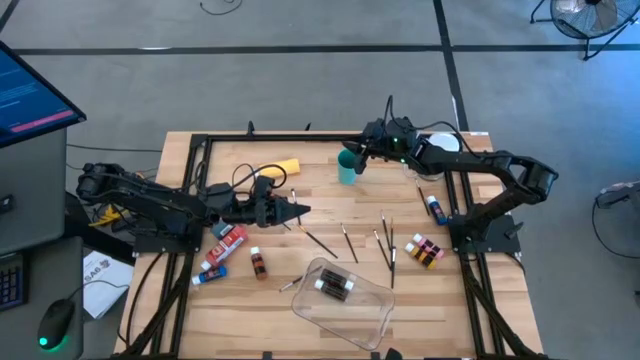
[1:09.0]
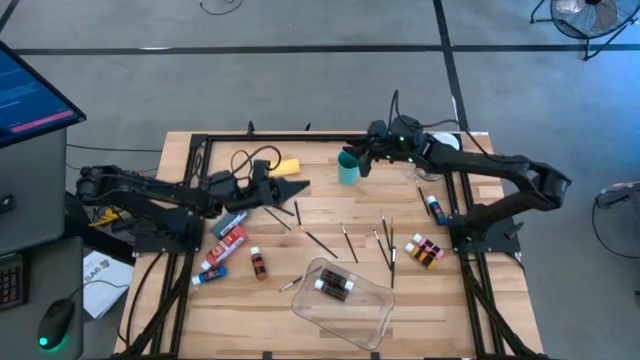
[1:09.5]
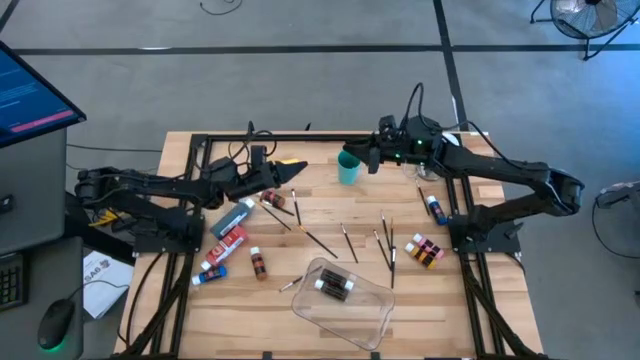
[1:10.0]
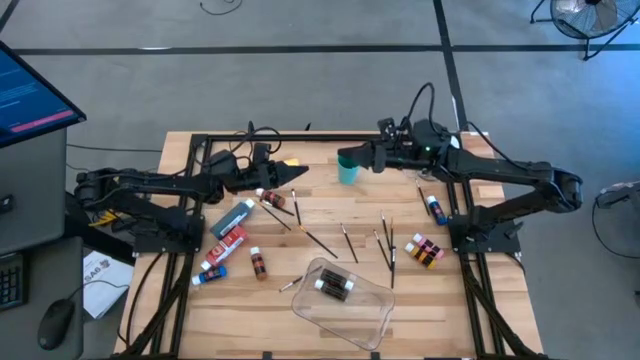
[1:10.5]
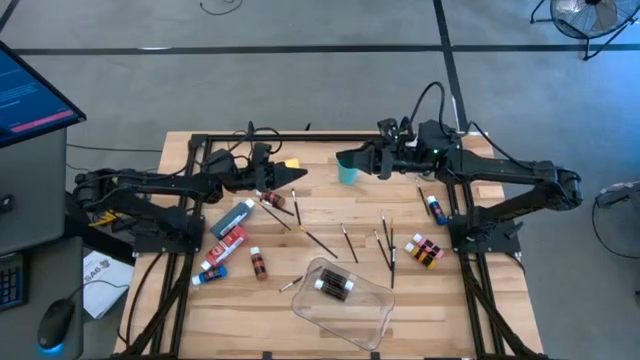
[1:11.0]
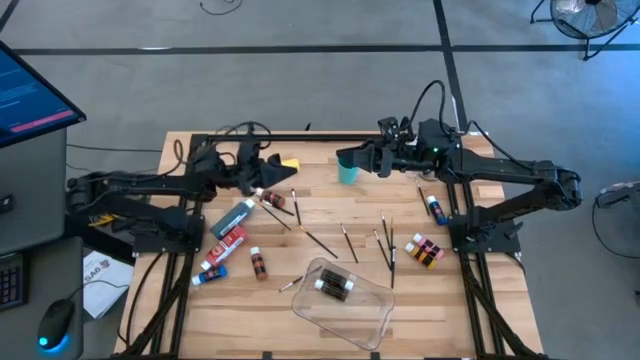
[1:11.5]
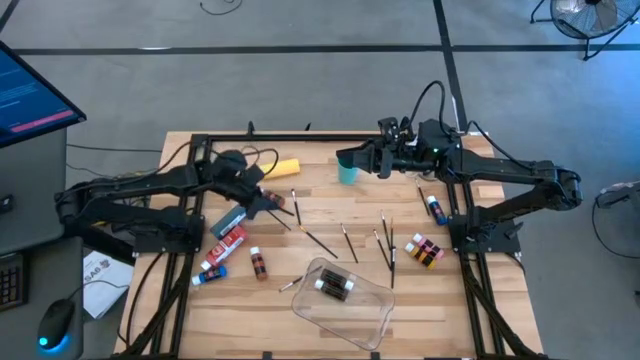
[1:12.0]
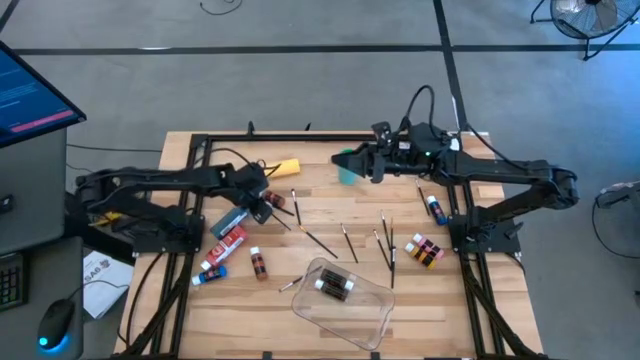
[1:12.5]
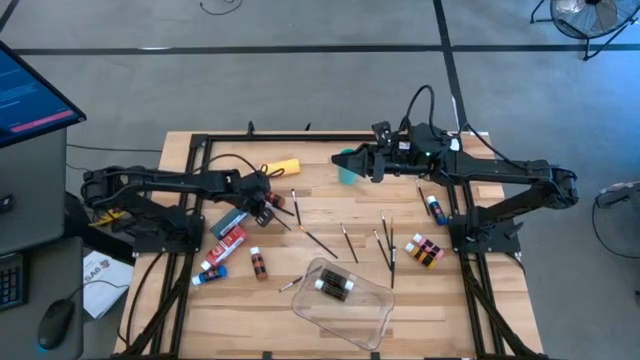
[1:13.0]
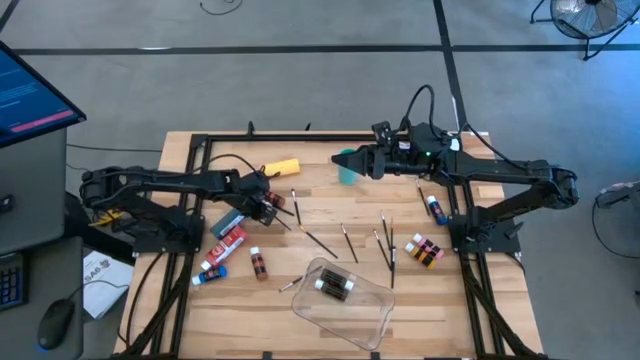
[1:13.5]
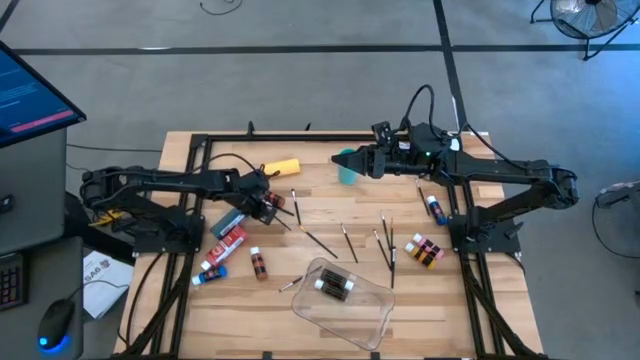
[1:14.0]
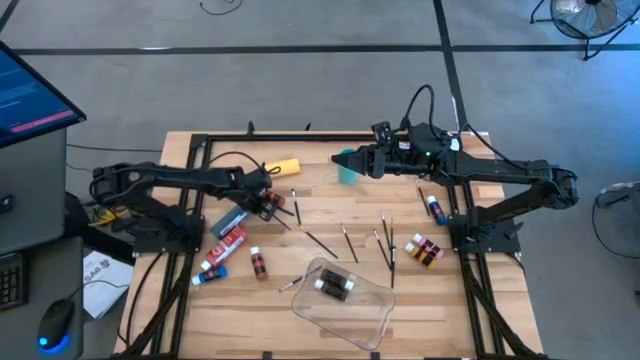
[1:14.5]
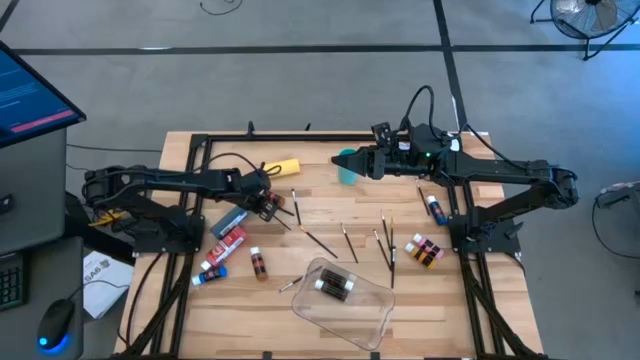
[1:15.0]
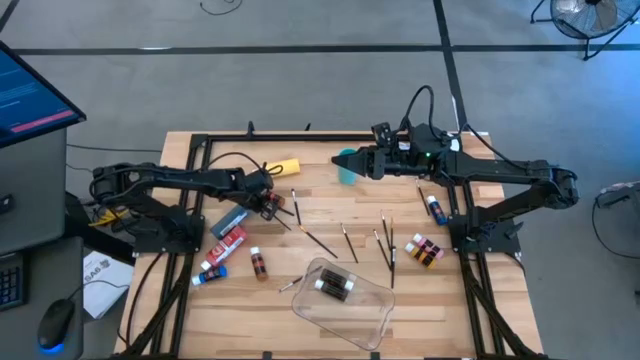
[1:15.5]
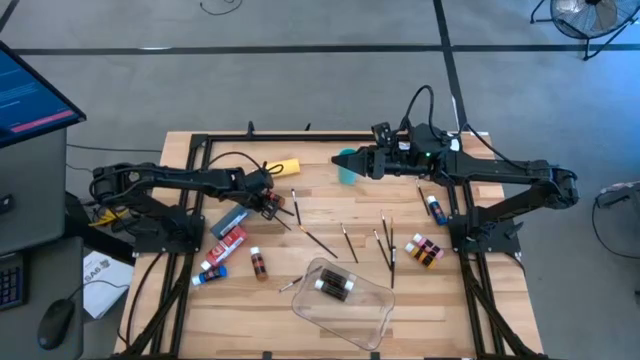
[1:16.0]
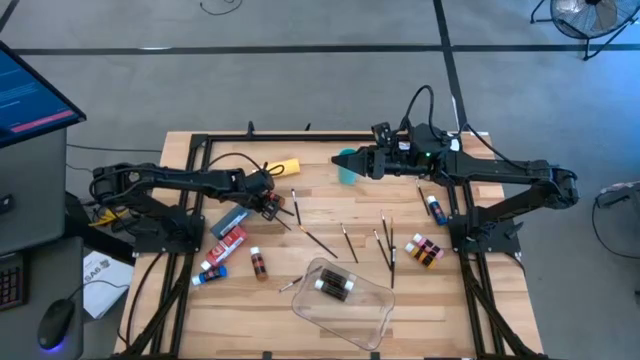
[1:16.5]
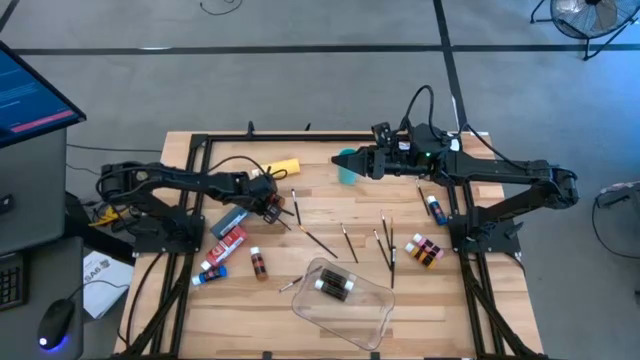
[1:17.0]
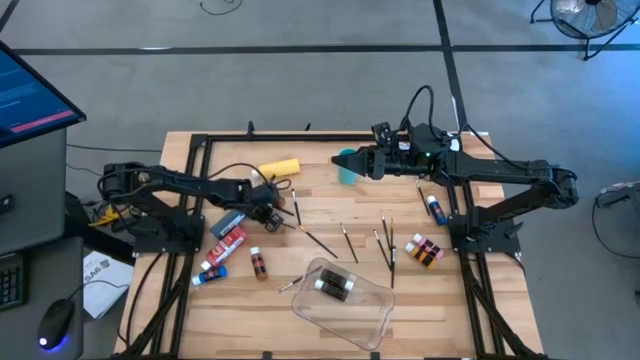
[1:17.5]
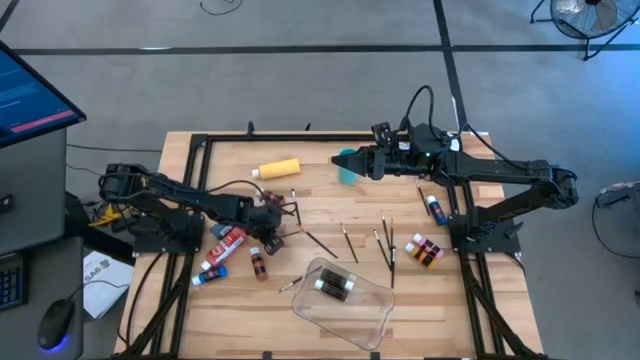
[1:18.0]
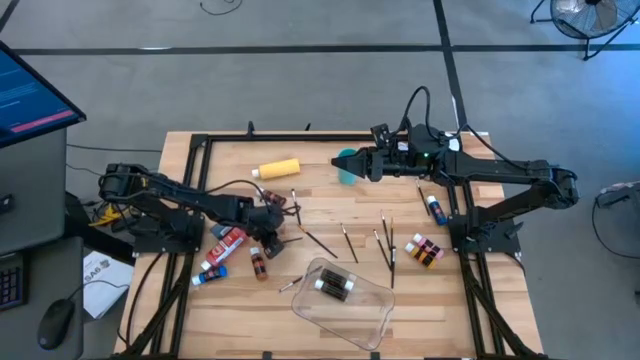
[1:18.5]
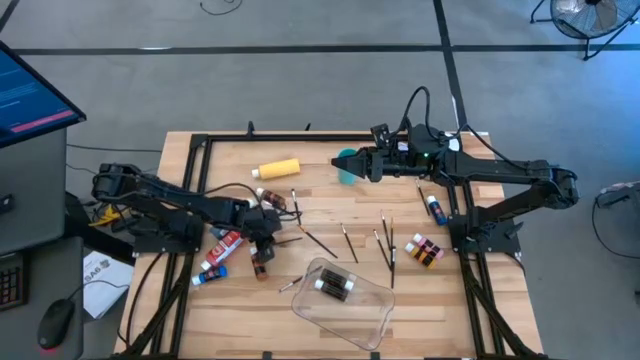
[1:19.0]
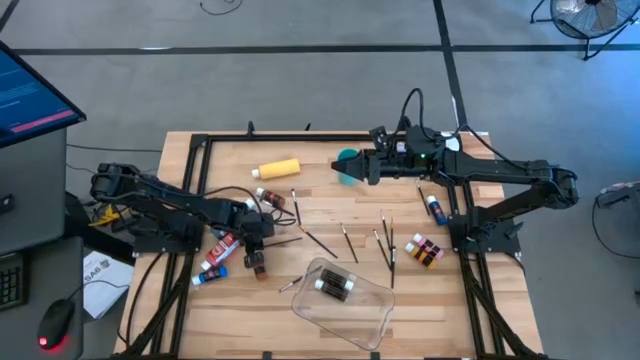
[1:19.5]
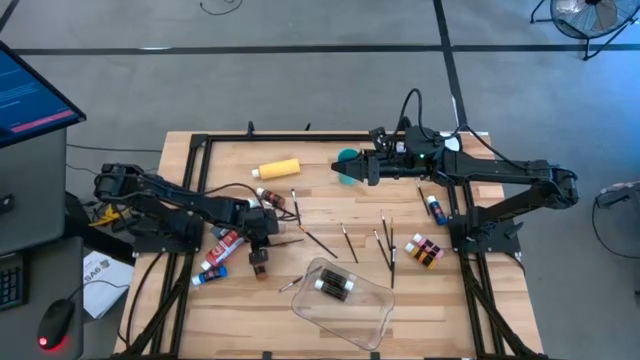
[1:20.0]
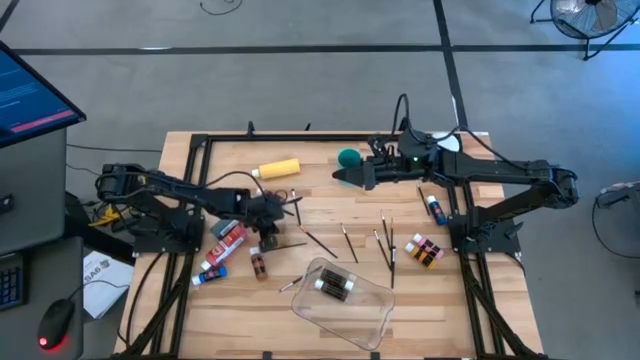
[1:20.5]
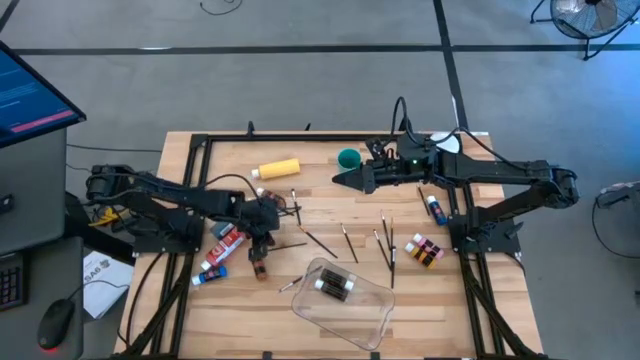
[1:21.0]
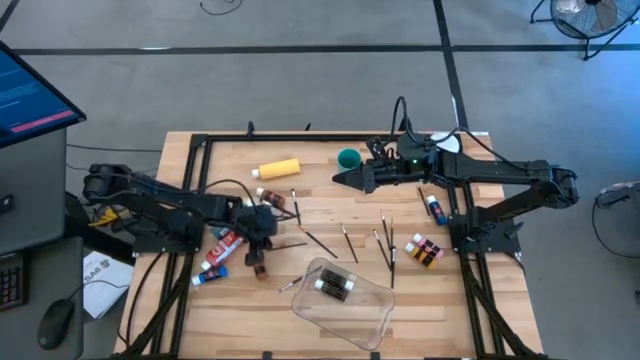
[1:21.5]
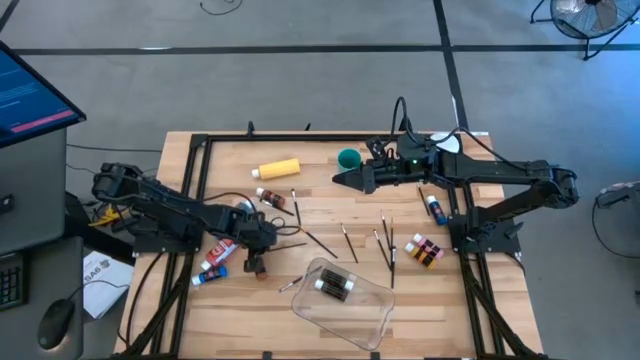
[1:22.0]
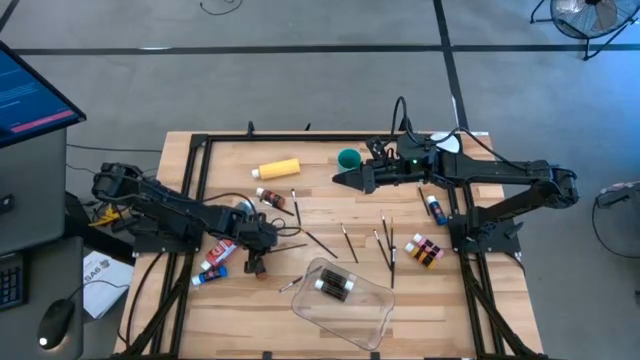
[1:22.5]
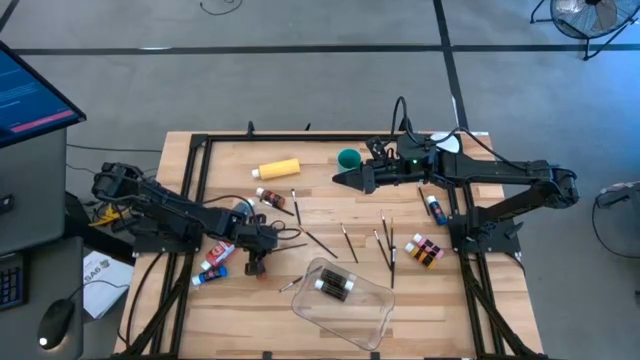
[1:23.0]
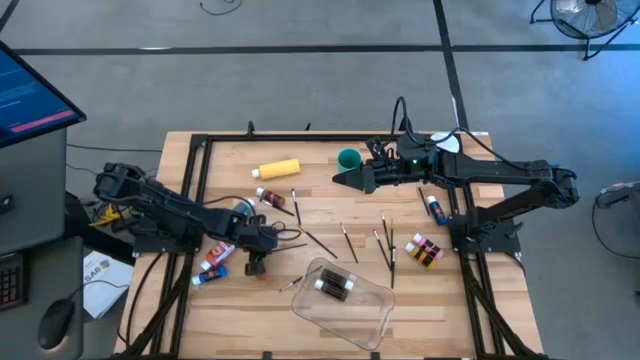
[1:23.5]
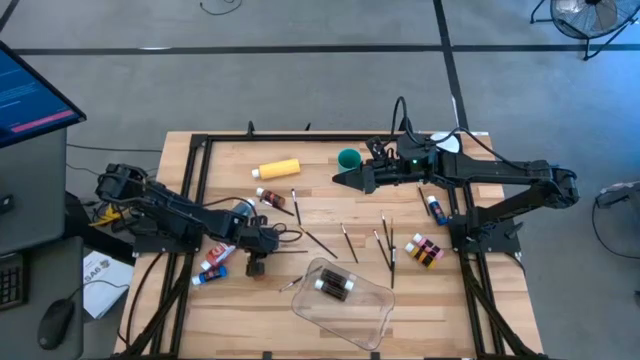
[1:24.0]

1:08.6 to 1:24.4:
Task: Pick & Place Paint Supplies
Put the gold paint brush into the green cup

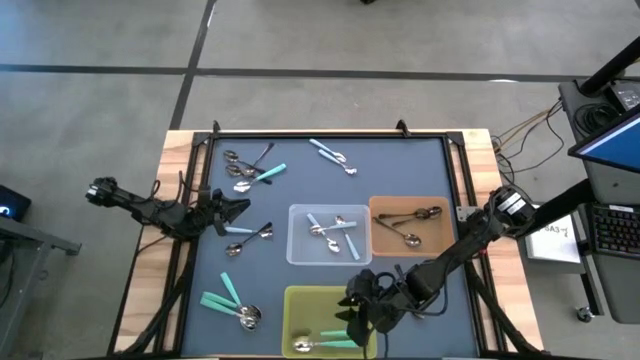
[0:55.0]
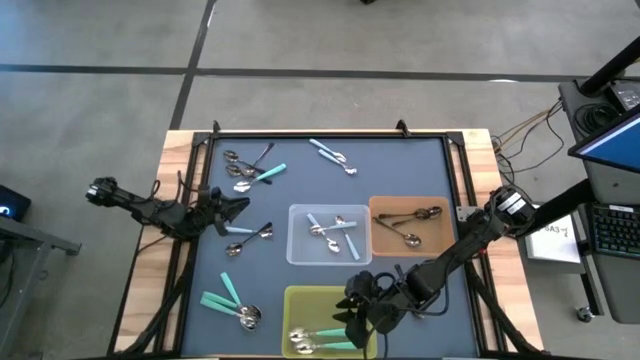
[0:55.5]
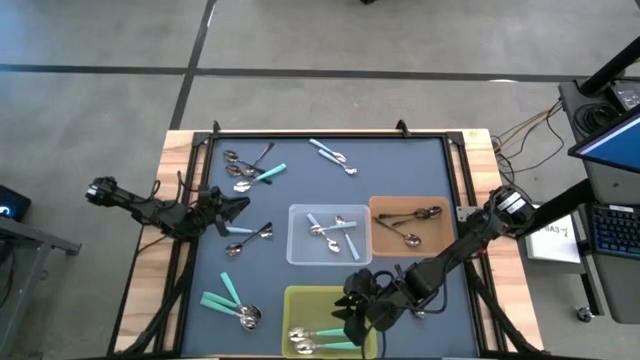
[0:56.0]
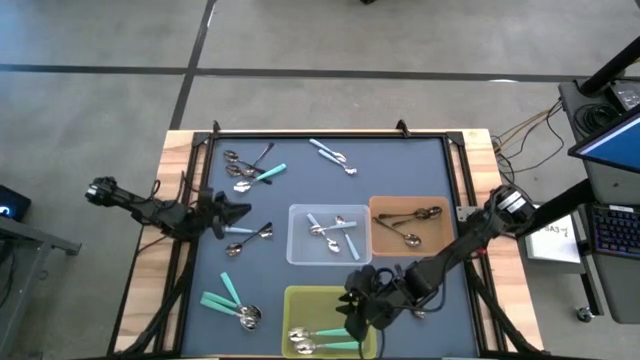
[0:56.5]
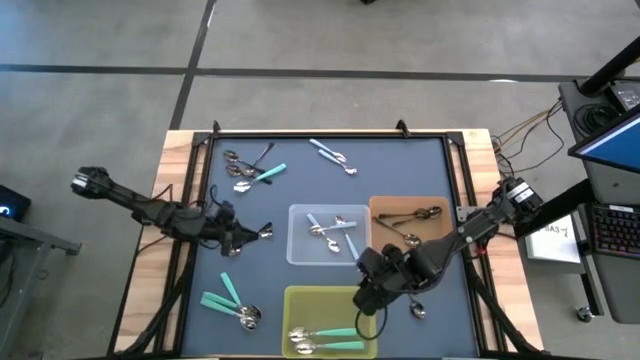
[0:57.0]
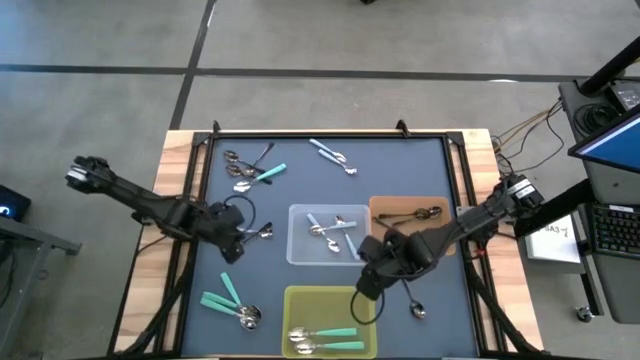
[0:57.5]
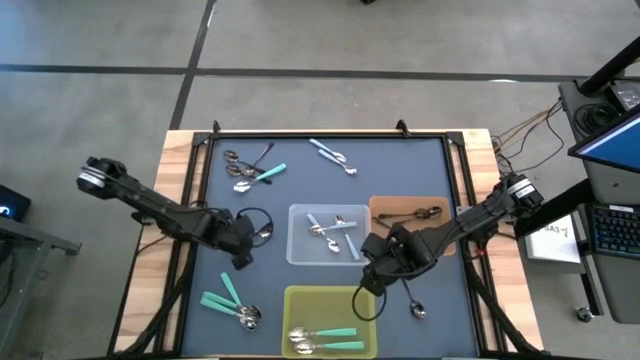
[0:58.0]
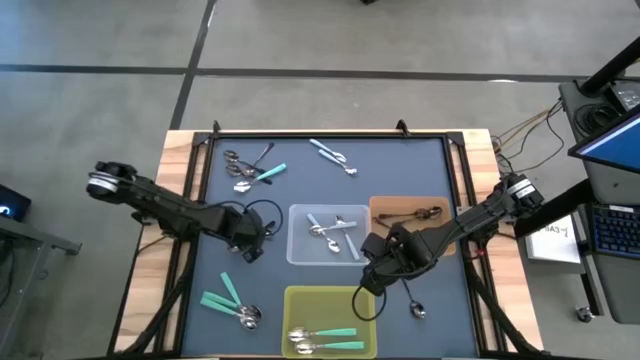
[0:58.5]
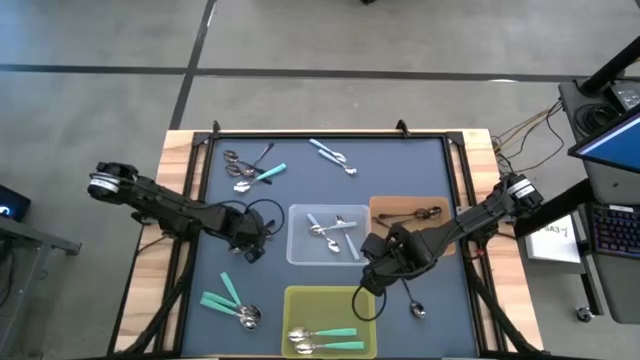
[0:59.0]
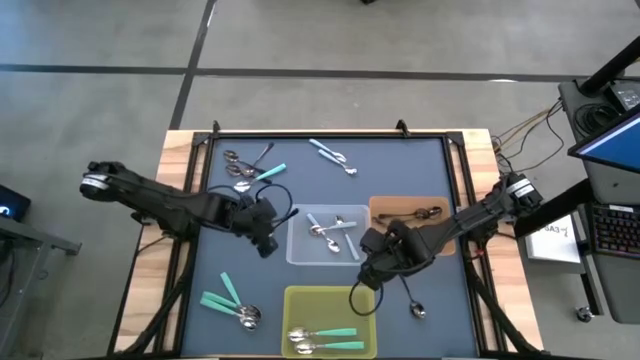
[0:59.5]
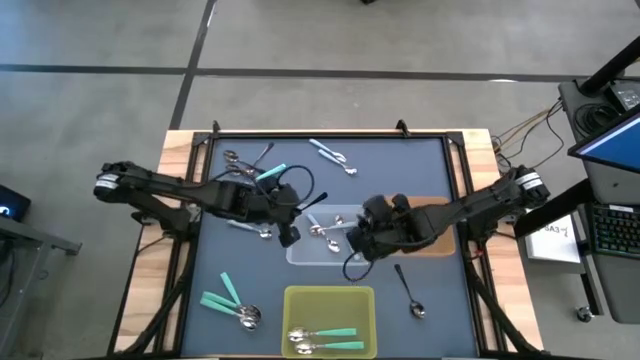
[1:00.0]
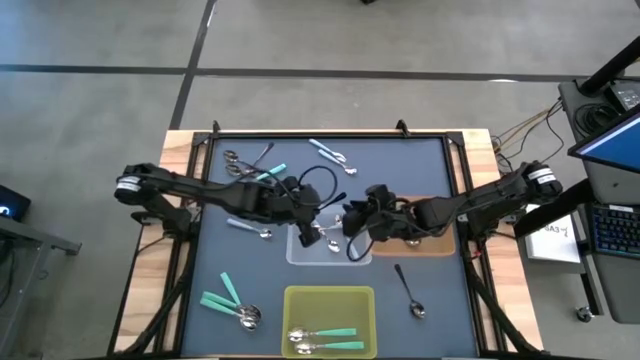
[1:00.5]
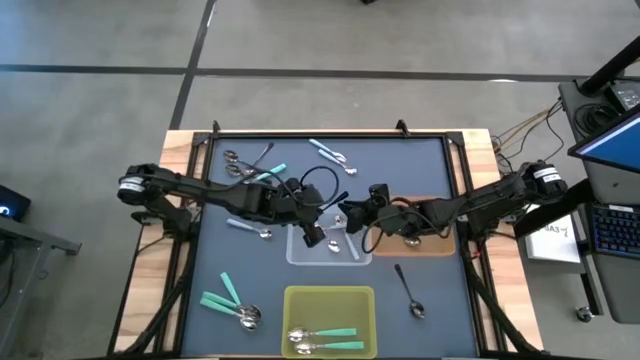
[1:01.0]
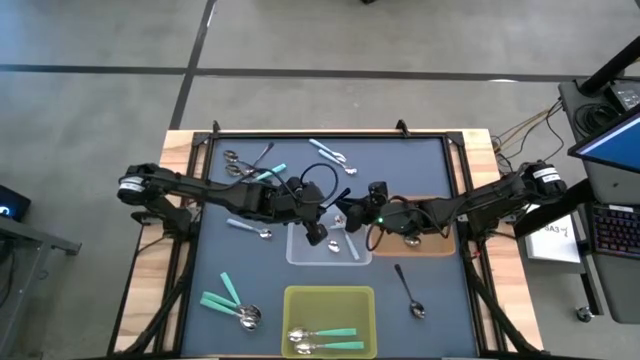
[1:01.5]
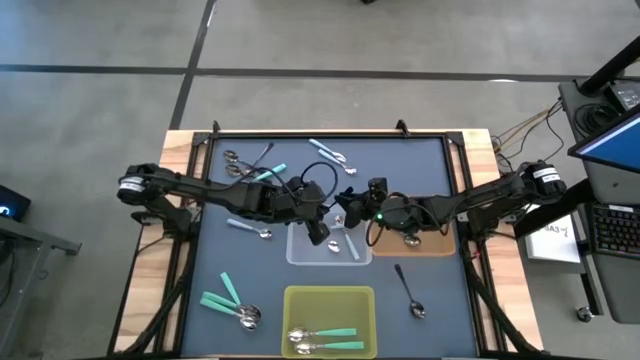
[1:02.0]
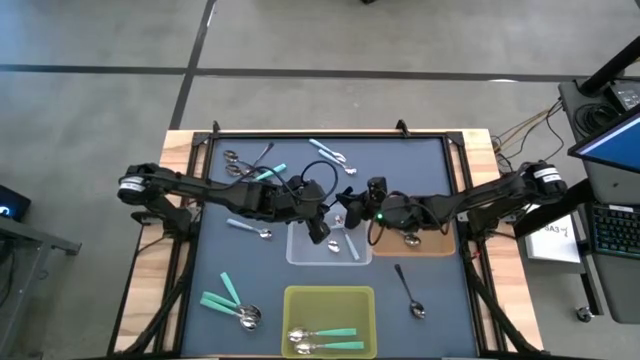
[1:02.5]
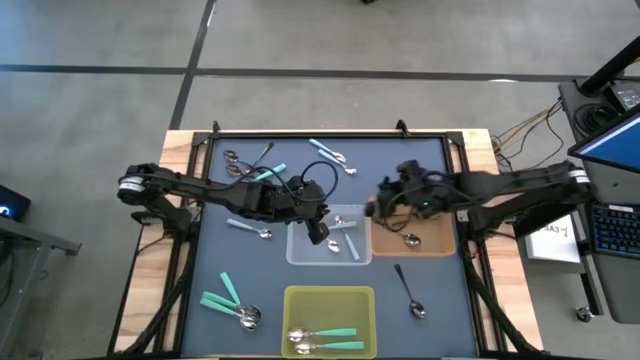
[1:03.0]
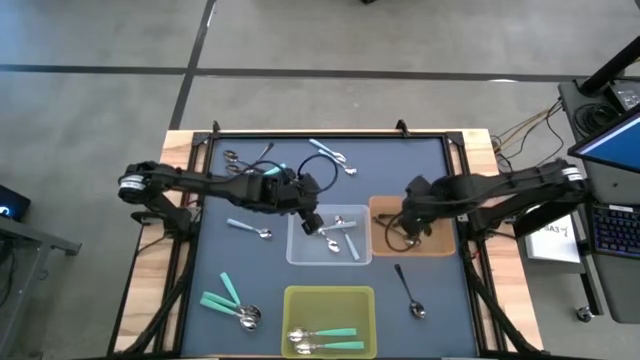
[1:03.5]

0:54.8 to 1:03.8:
Task: Sort silverware by color (type)
Put the black spoon into the orange bin
